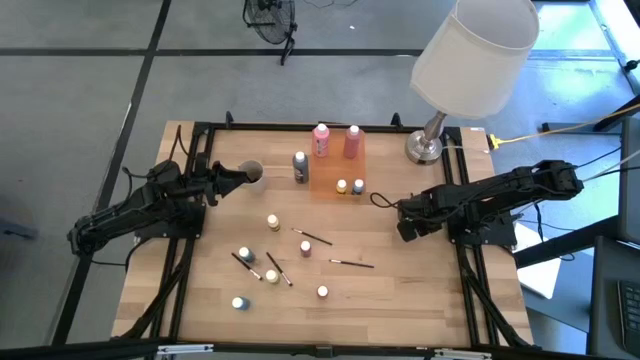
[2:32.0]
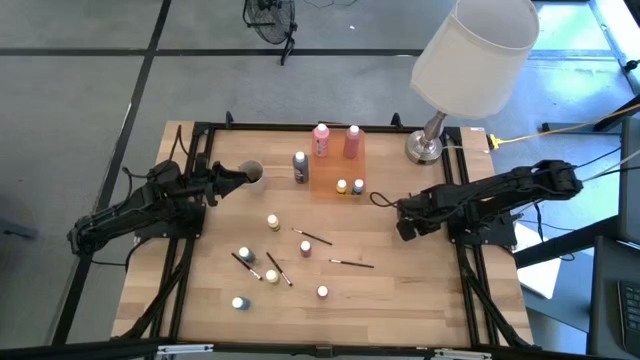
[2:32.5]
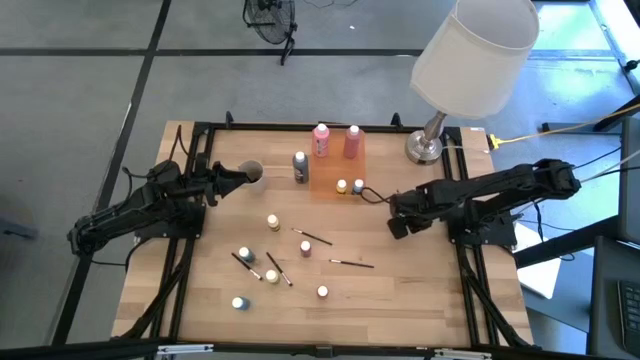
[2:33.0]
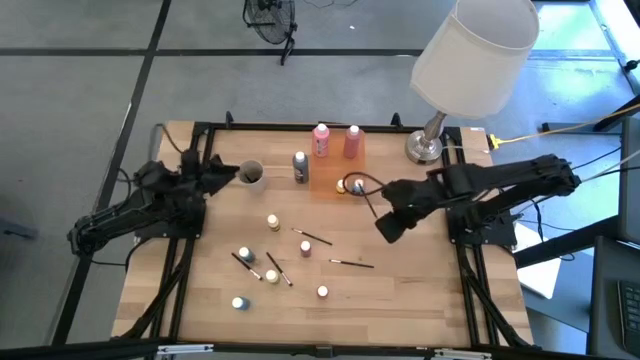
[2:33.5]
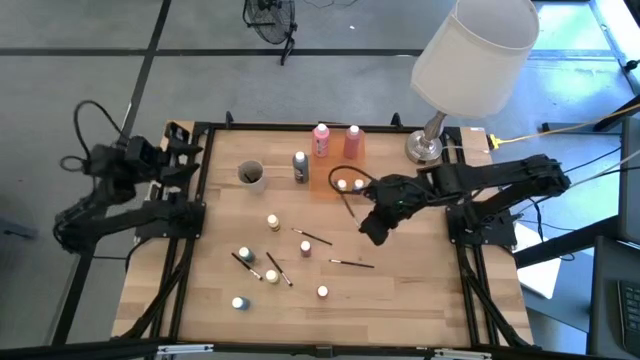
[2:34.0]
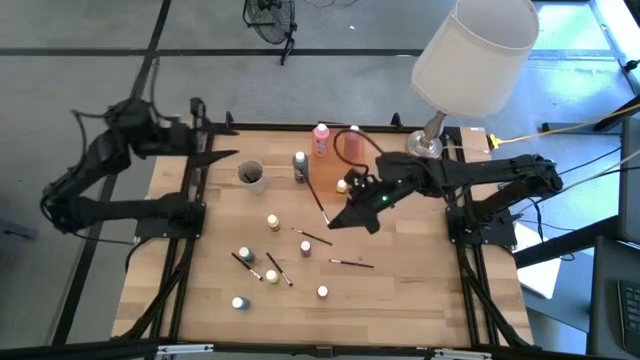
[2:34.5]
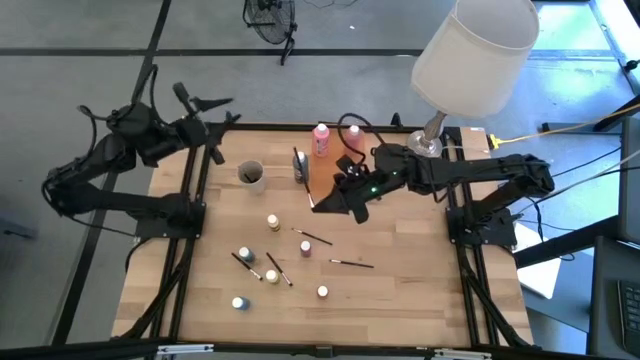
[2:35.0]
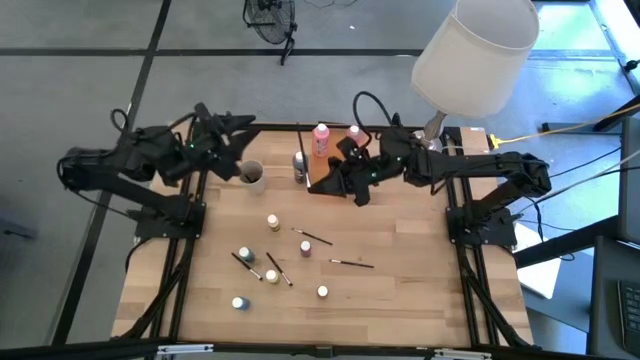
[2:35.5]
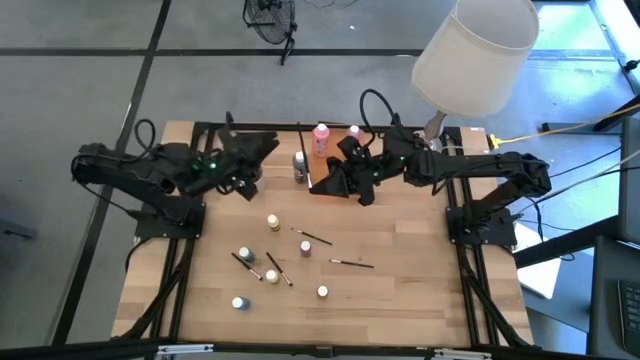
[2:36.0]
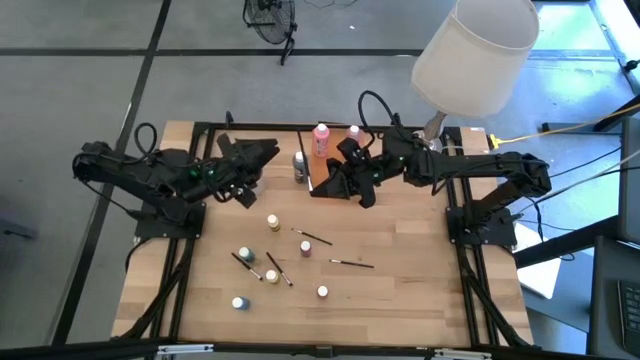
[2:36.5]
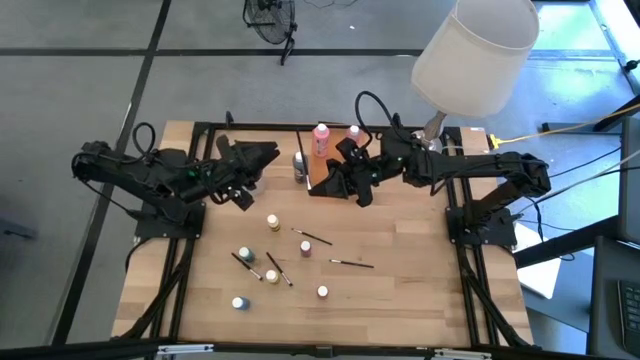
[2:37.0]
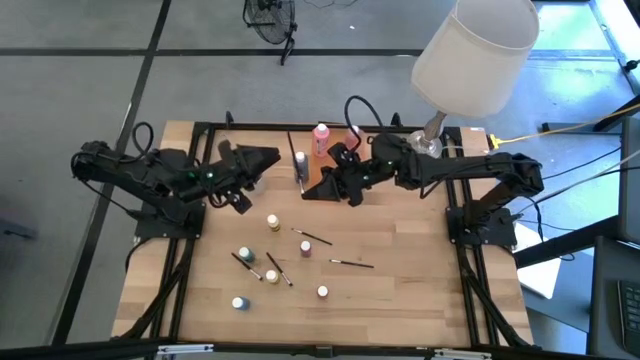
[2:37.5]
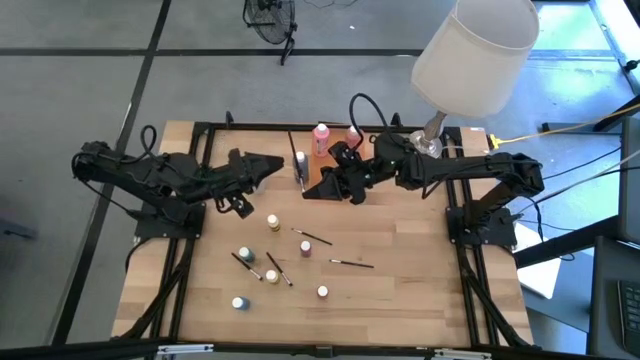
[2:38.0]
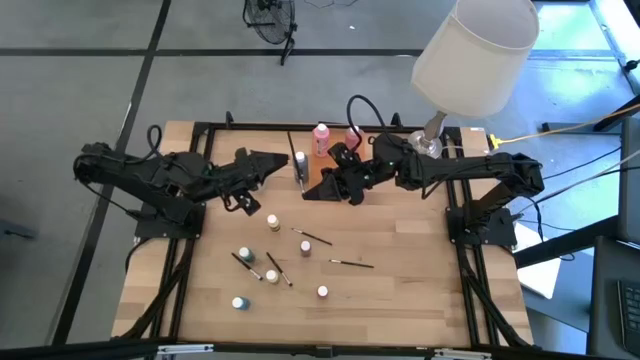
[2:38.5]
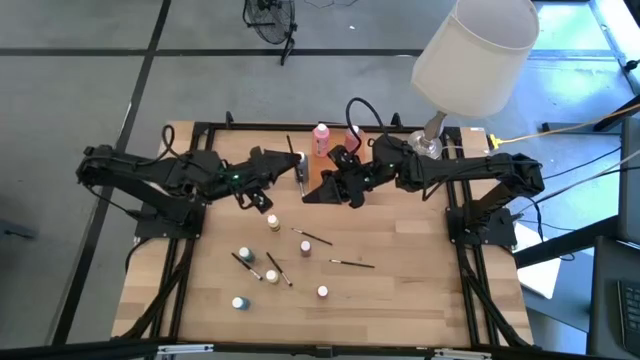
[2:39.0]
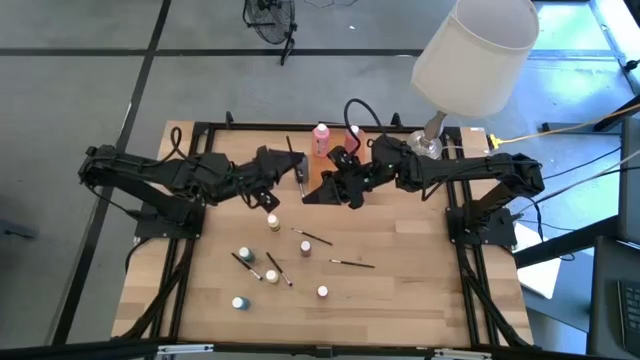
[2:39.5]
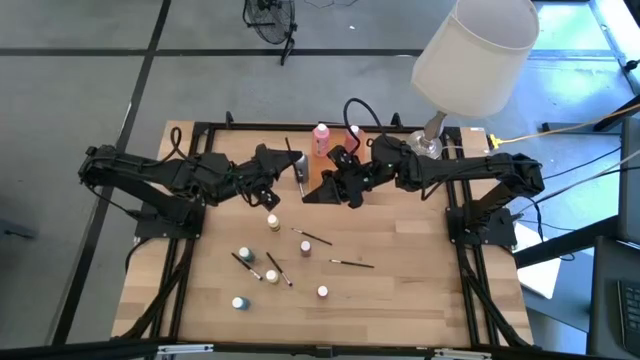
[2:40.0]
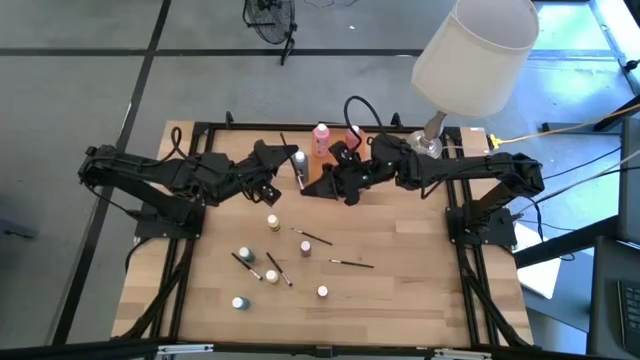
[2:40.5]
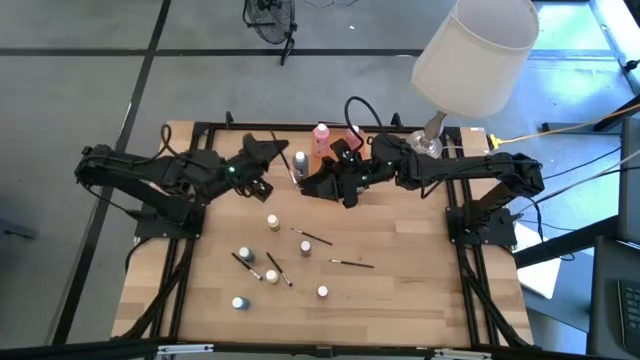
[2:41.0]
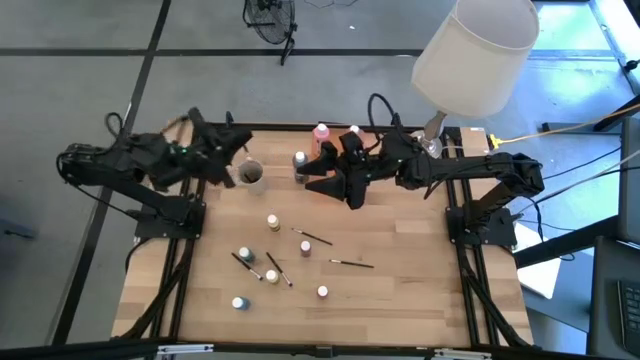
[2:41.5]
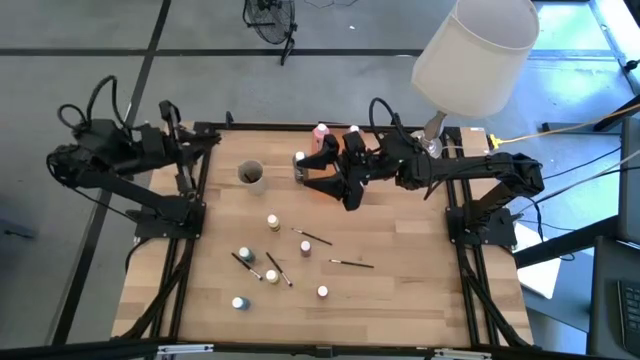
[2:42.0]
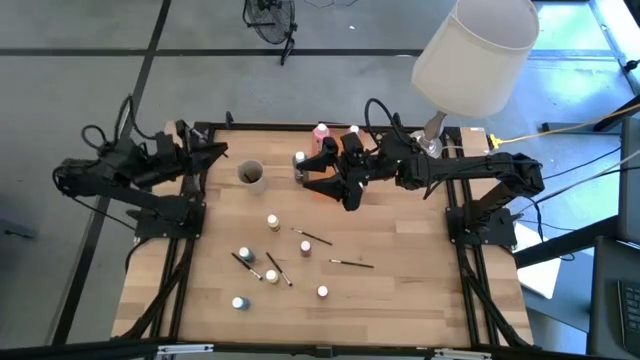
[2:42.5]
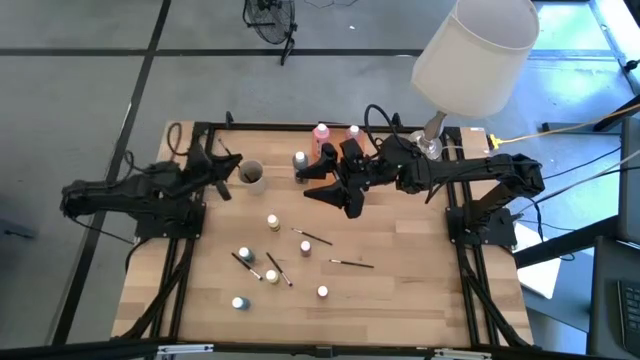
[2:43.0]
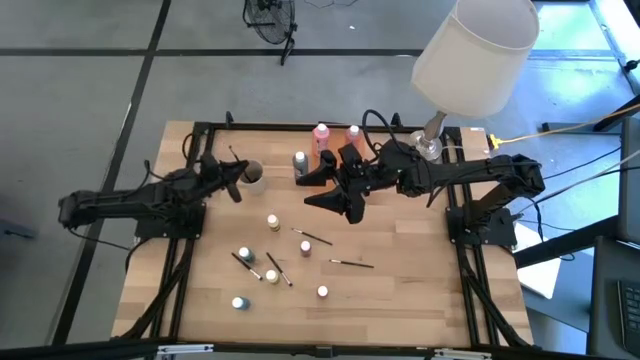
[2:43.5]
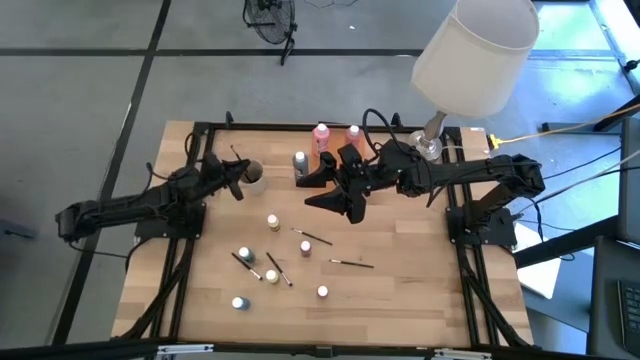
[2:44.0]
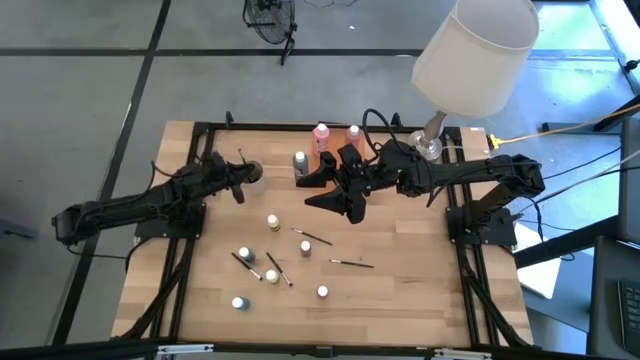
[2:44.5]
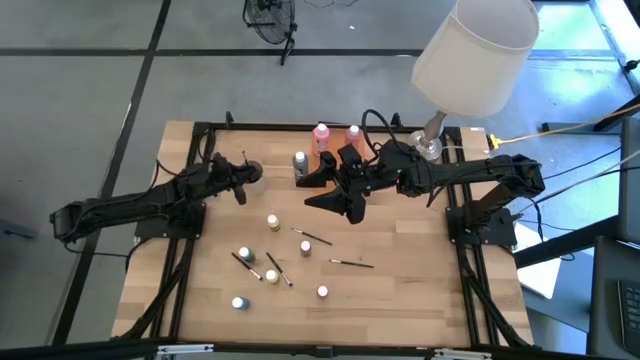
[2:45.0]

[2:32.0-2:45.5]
Task: Pick & Place Paint Supplies
Put the silver paint brush into the white cup

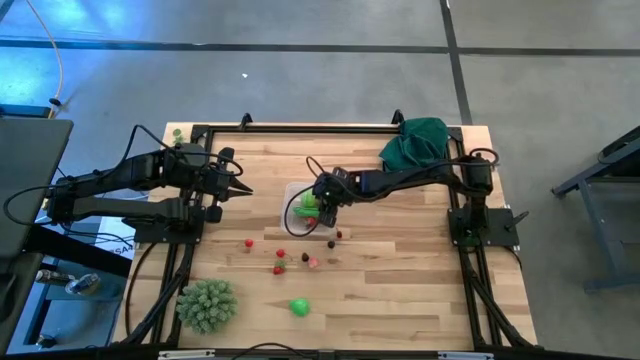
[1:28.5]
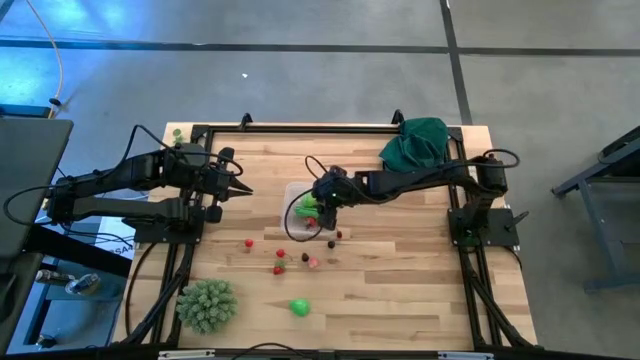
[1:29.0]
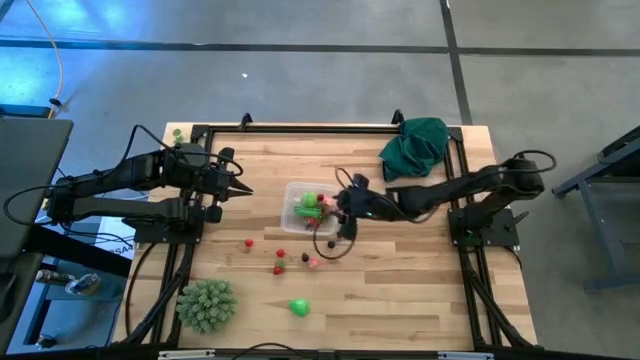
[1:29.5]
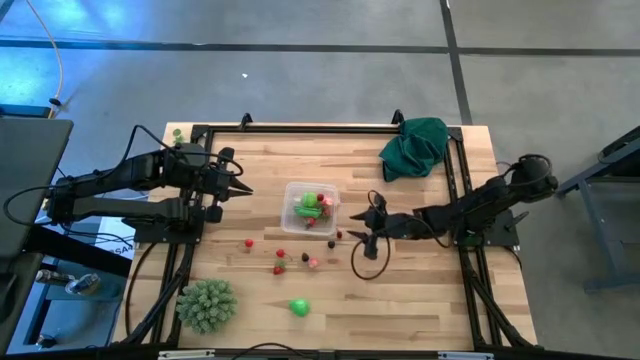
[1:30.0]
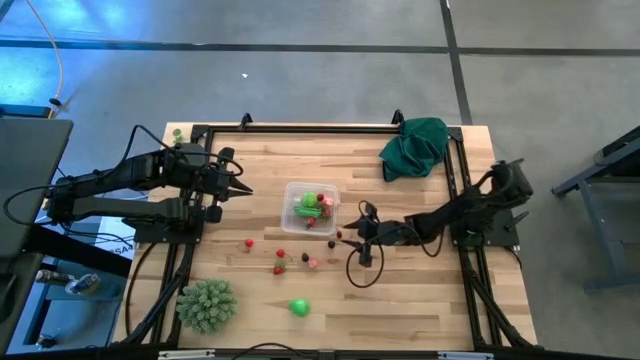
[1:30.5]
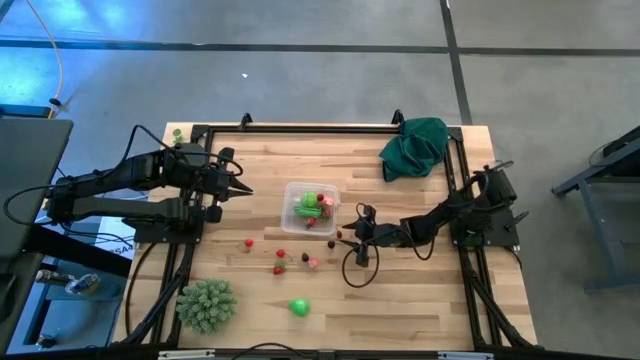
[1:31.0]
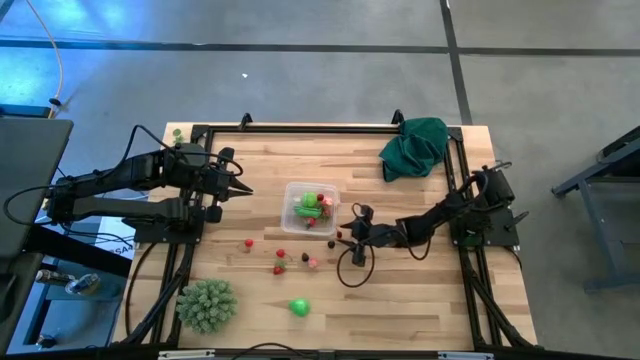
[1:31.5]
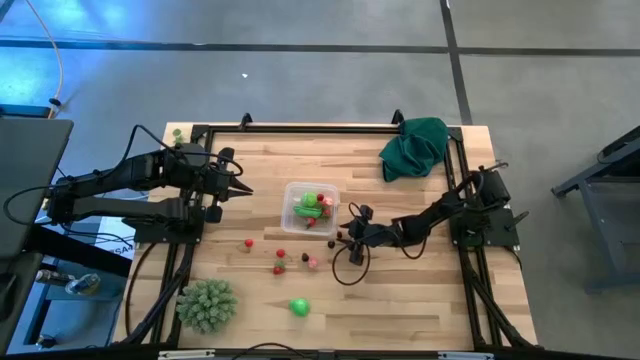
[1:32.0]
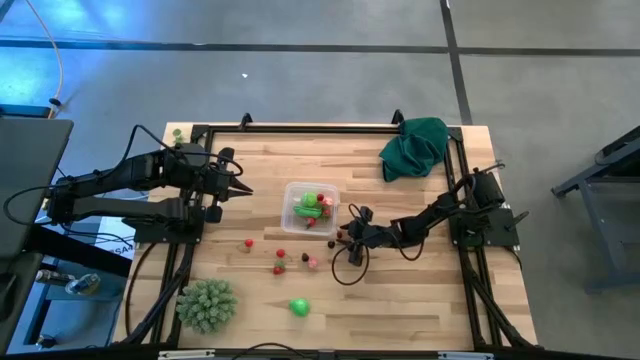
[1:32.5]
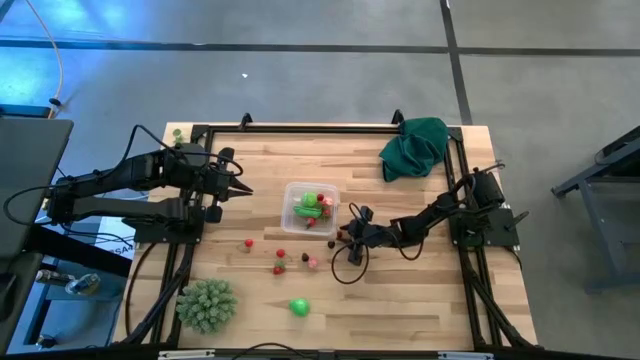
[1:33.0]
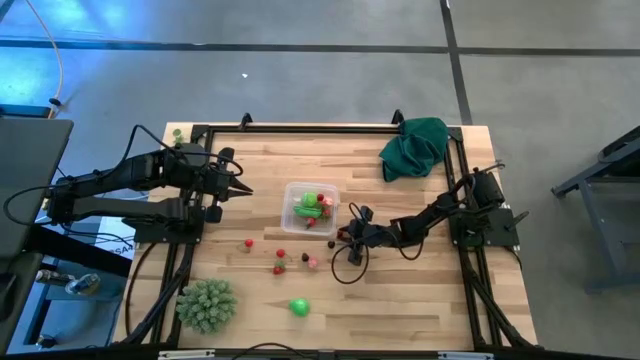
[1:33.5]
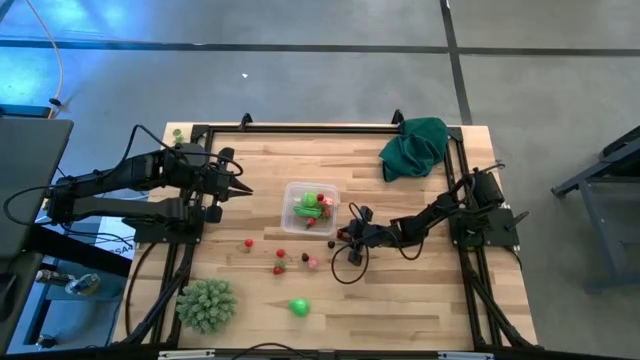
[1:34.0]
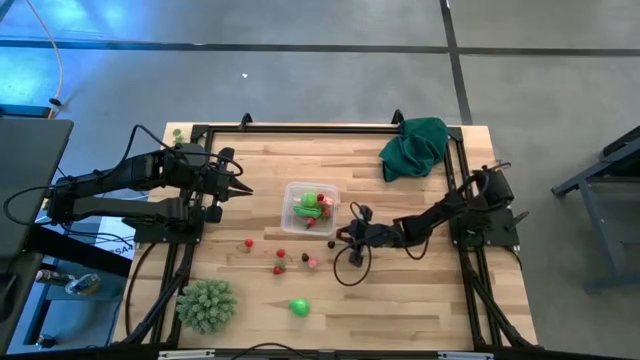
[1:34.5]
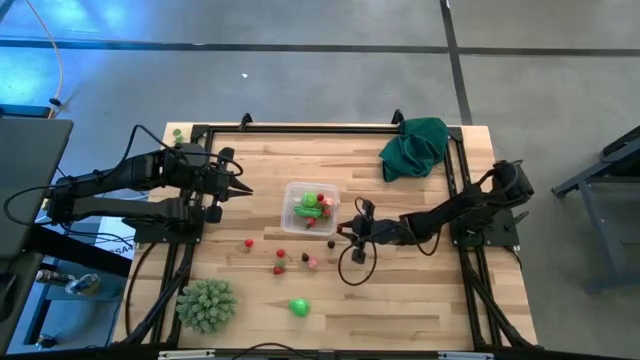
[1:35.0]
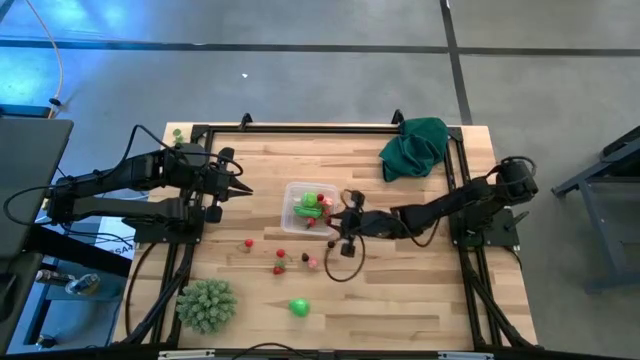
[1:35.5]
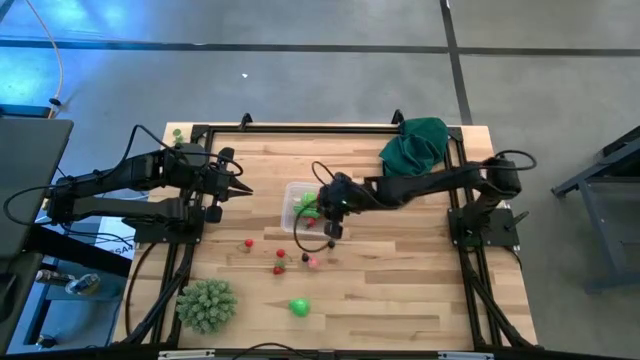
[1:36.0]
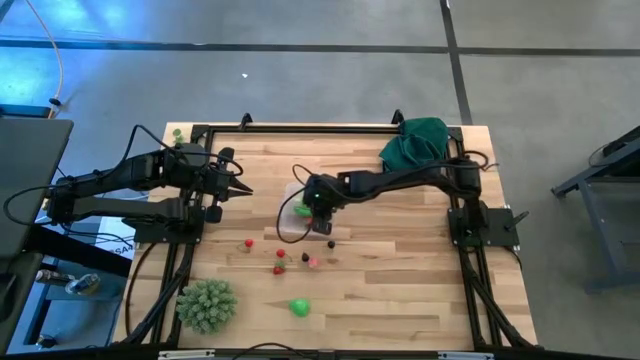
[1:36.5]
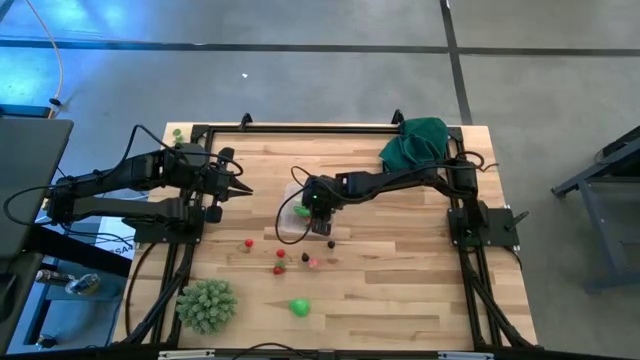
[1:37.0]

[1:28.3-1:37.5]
Task: Pick and placing Produce into tupperware
Put the red cherry into the transparent container
